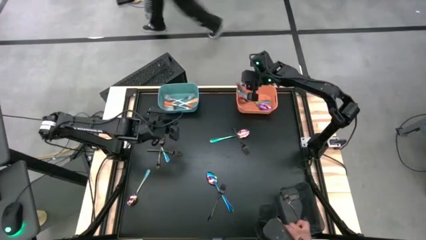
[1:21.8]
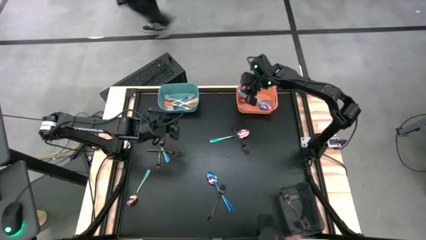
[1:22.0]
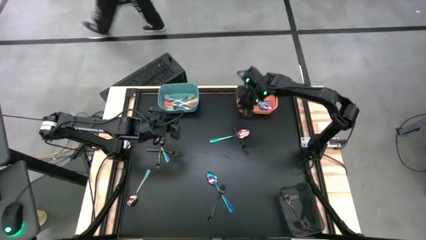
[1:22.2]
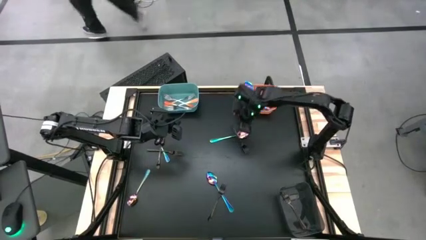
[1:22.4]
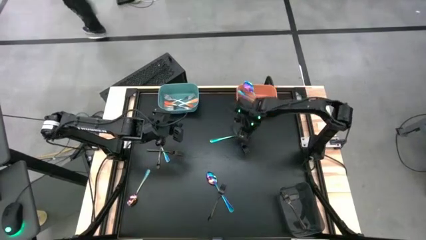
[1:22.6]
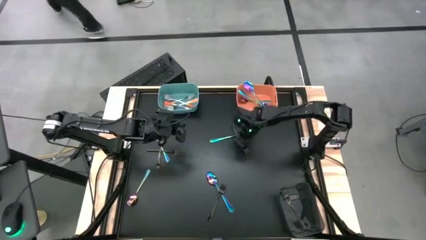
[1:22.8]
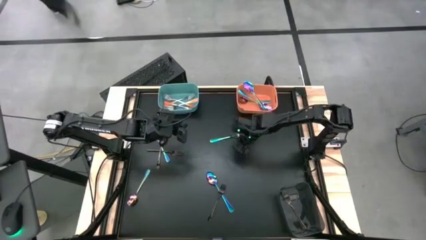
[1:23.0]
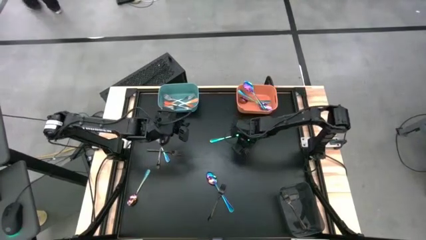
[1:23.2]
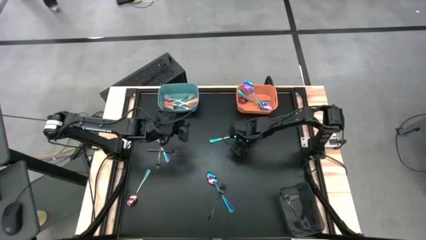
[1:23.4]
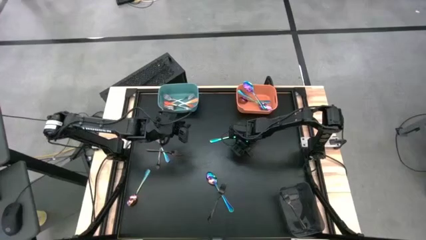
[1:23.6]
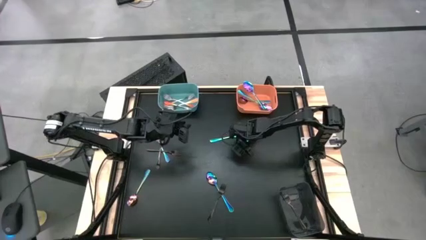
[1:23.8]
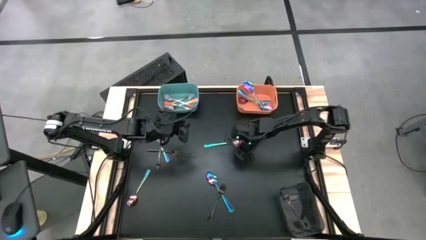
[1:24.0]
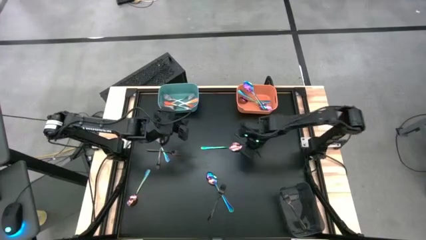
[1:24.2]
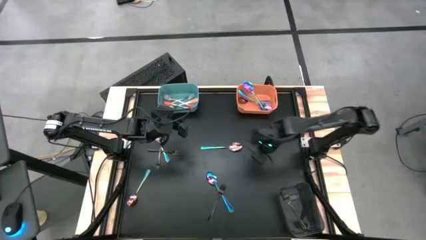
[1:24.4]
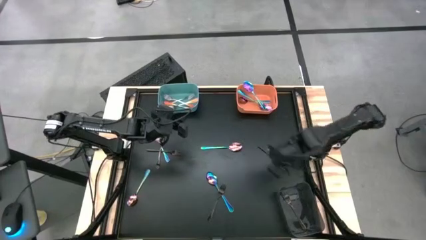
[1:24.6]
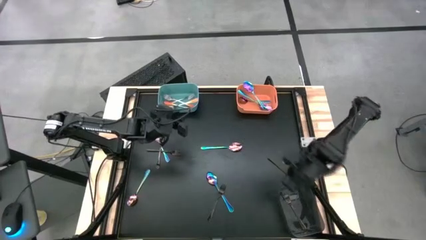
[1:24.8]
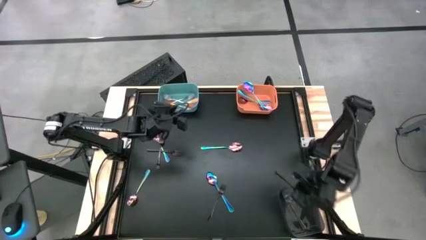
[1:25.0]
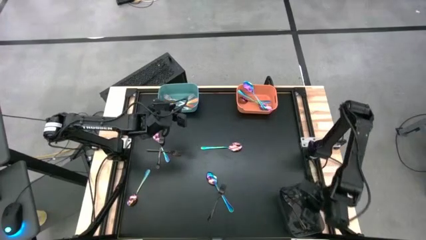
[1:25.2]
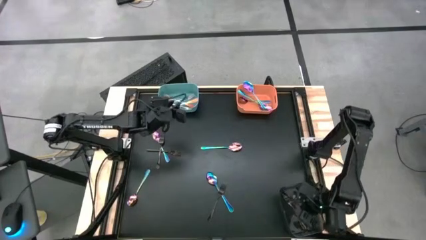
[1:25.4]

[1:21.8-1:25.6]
Task: Sort silverware by color (type)
Put the black fork into the black bin

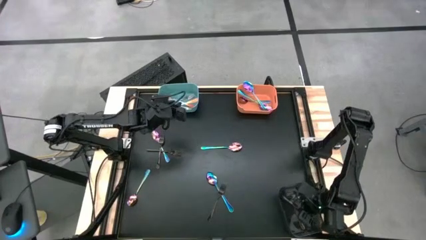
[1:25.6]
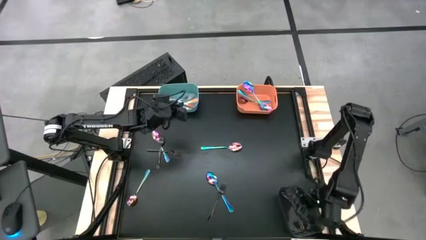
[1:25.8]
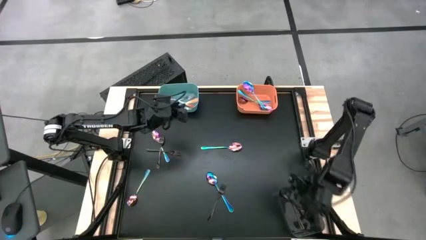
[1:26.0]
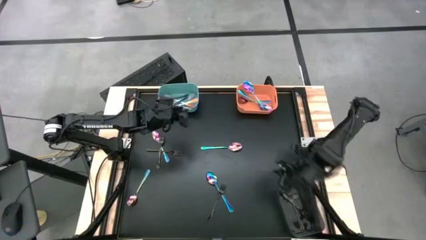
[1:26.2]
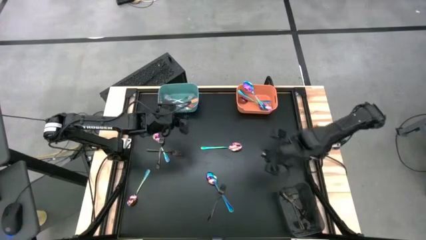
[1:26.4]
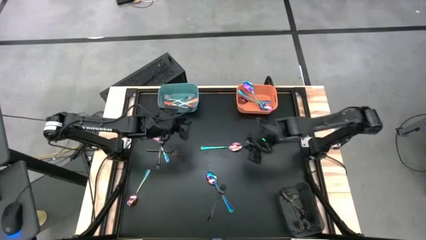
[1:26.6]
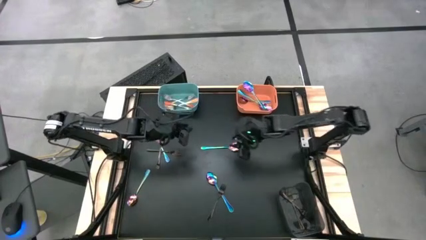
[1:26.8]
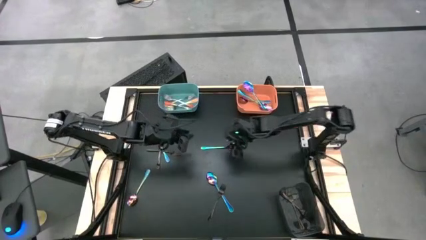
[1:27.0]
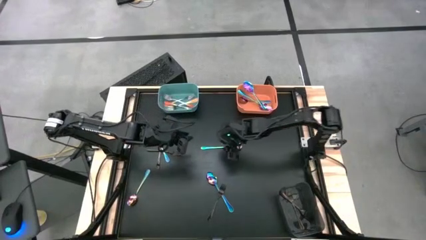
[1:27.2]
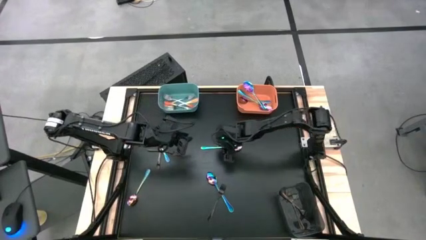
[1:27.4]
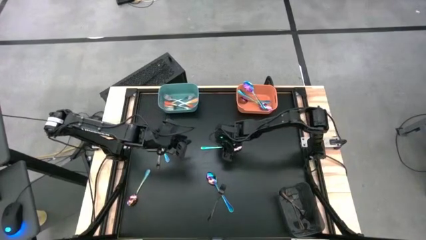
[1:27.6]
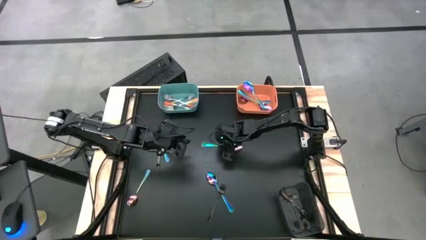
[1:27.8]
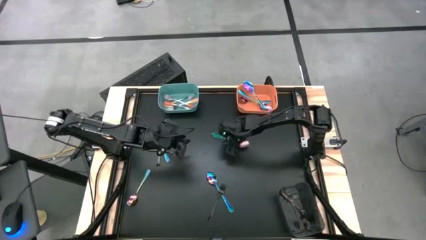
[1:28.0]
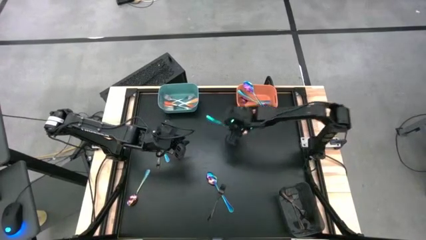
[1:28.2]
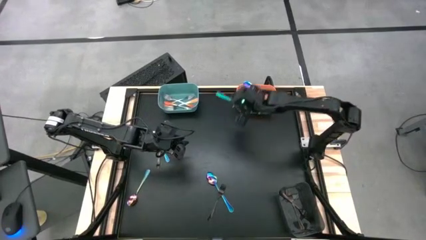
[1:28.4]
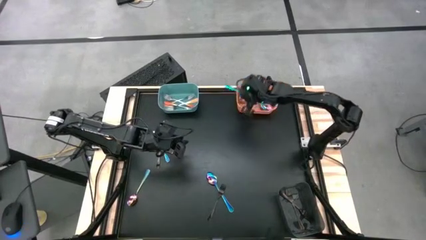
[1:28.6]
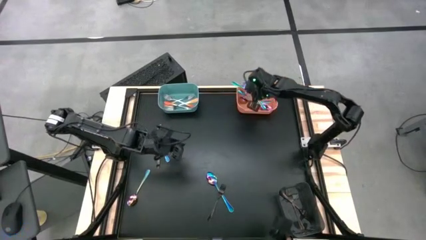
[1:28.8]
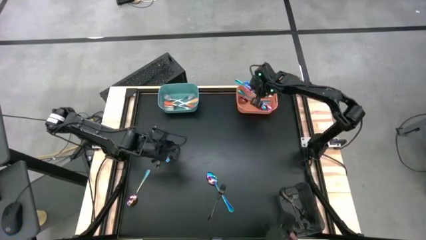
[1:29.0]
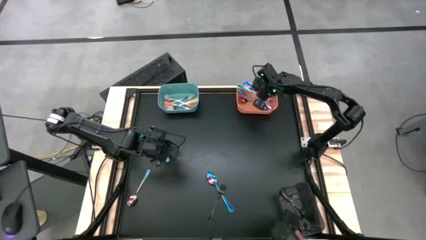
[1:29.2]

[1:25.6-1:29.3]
Put the purple spoon into the orange bin

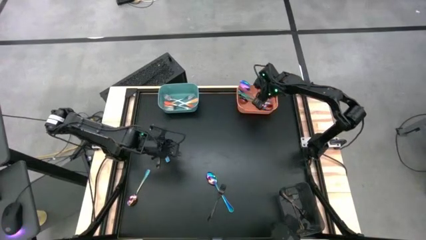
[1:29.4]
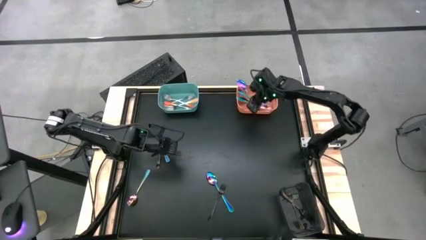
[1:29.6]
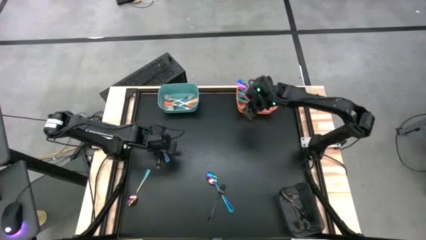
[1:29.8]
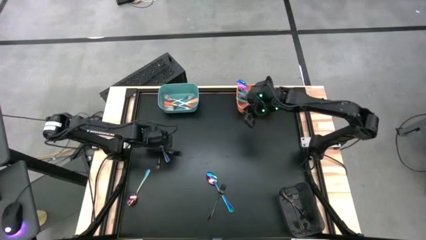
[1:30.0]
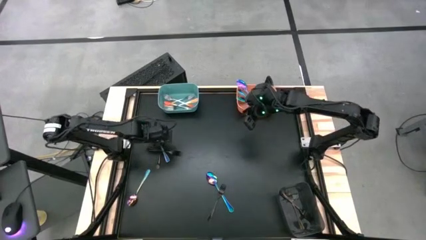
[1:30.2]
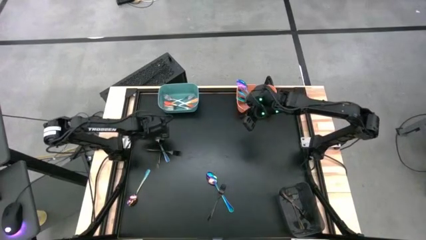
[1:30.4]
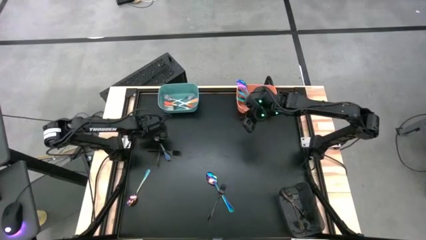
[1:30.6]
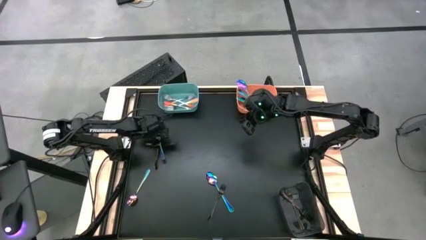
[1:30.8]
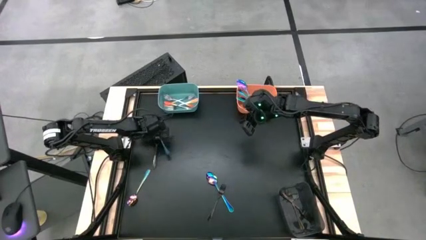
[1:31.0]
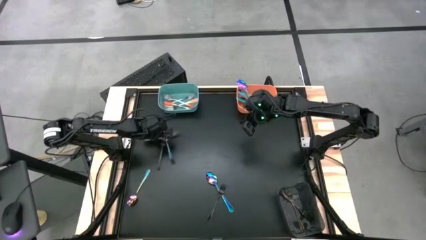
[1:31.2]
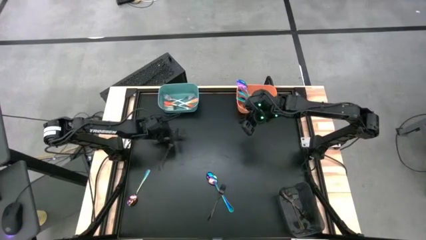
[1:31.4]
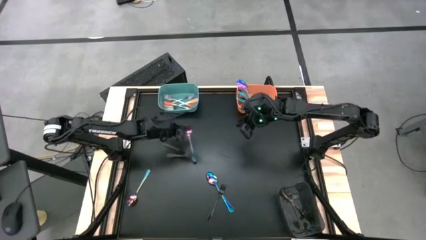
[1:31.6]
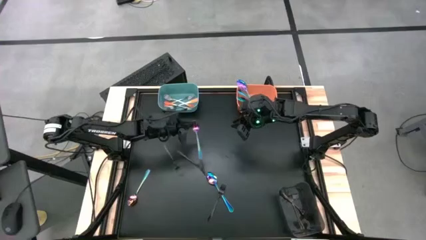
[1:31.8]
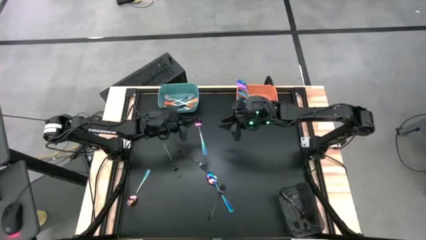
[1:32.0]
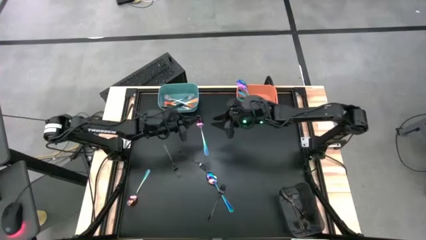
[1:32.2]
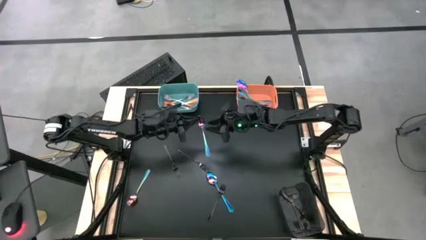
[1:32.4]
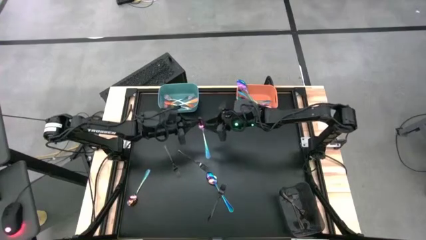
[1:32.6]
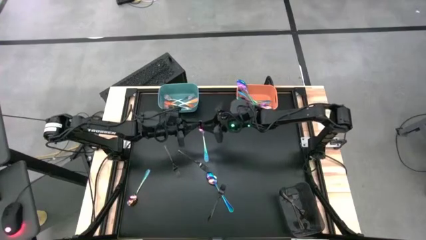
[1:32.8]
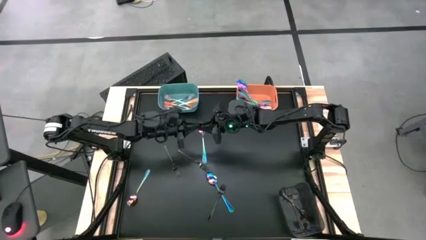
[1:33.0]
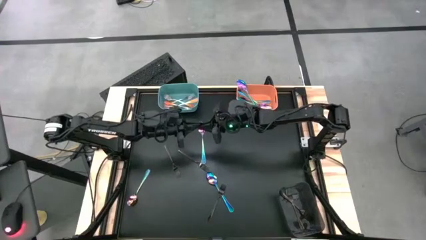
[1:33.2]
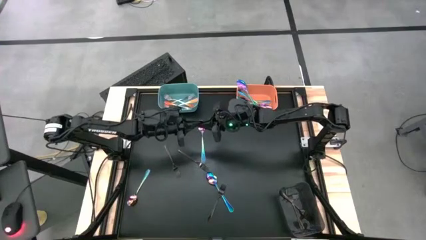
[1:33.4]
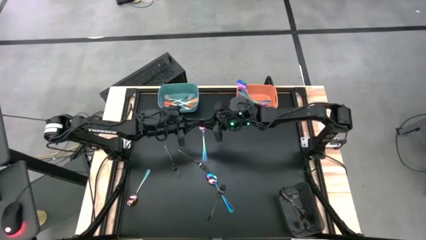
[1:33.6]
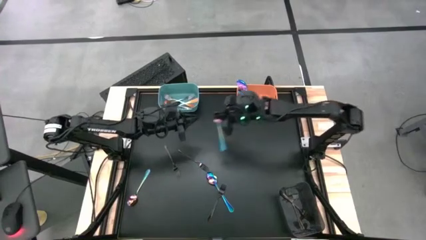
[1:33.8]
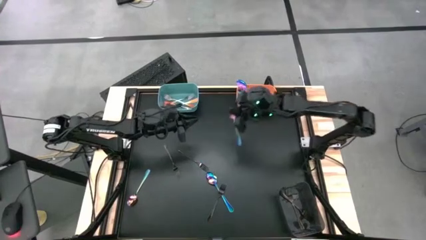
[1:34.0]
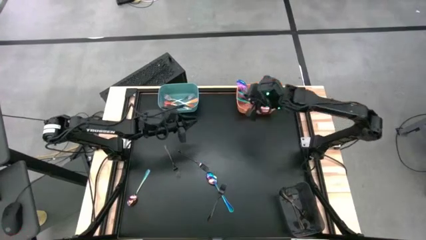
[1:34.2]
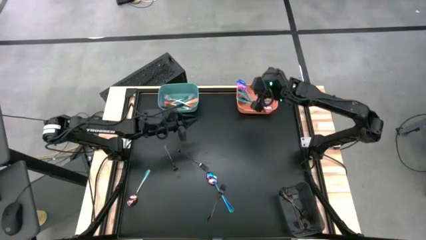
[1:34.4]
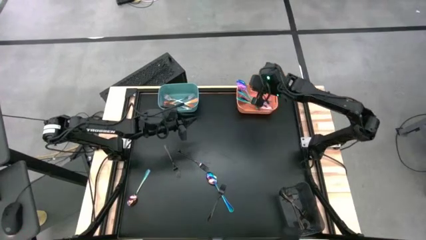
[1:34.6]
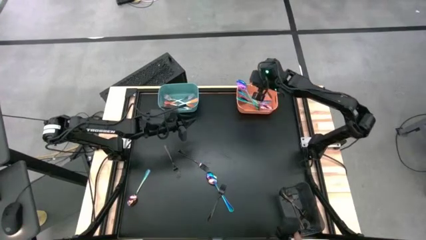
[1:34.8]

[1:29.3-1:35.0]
Put the purple spoon into the orange bin

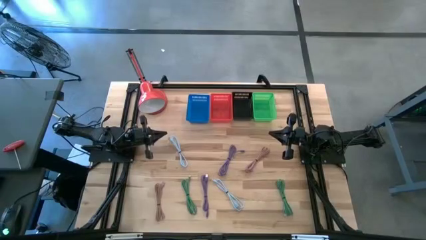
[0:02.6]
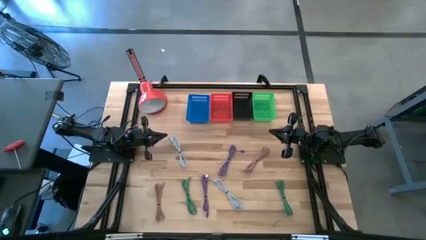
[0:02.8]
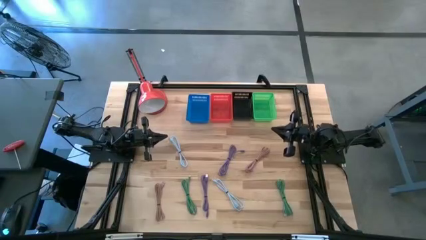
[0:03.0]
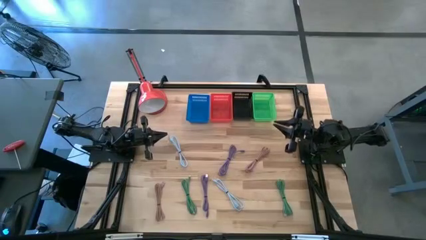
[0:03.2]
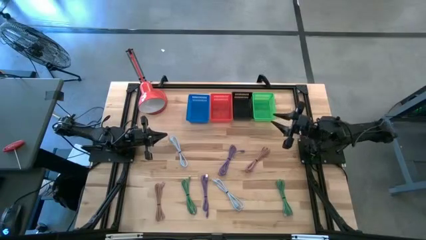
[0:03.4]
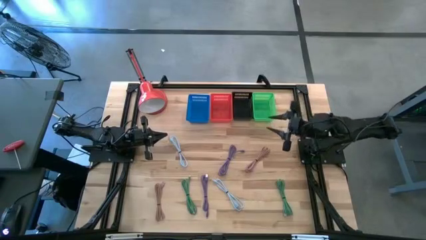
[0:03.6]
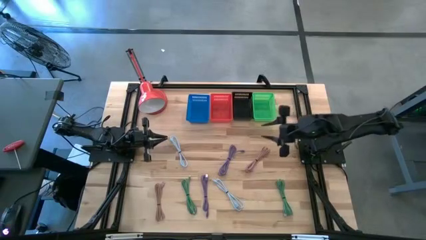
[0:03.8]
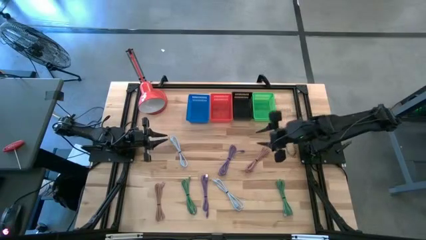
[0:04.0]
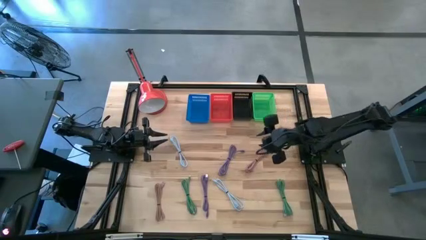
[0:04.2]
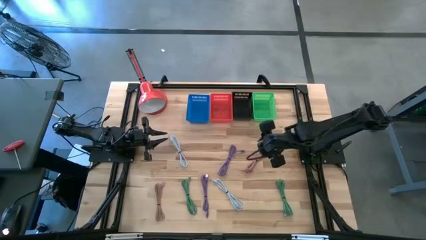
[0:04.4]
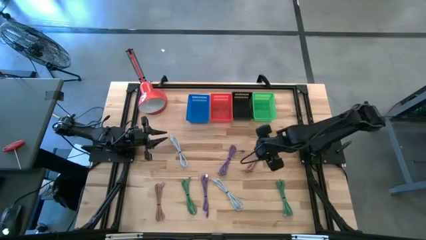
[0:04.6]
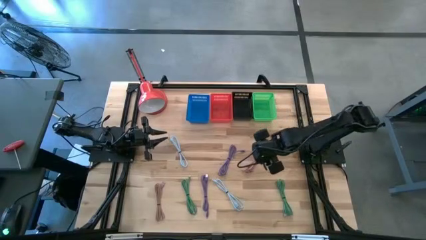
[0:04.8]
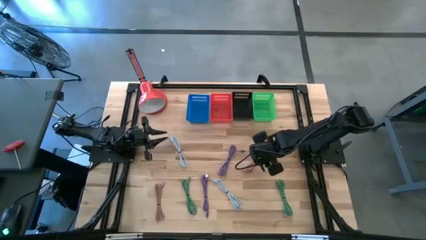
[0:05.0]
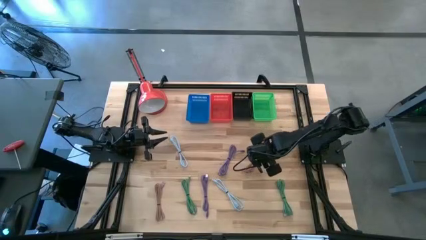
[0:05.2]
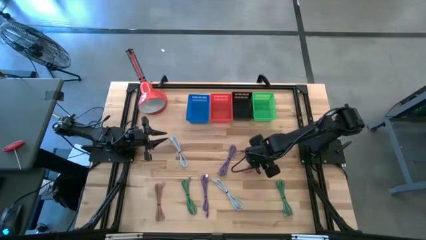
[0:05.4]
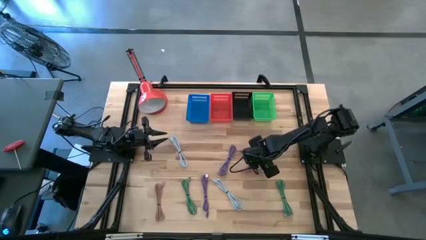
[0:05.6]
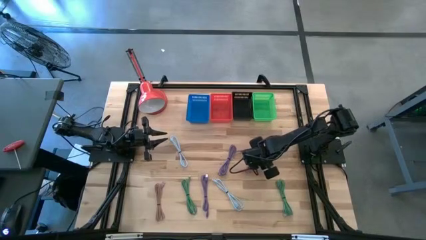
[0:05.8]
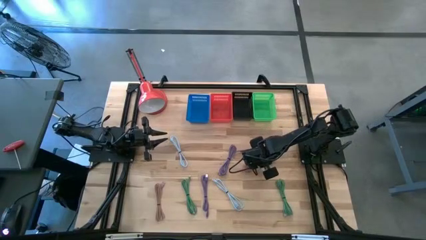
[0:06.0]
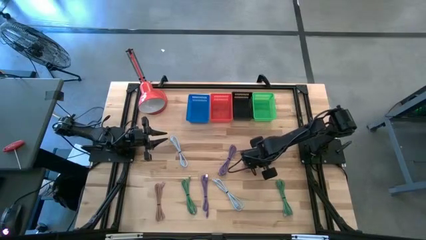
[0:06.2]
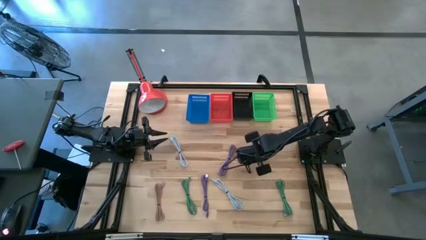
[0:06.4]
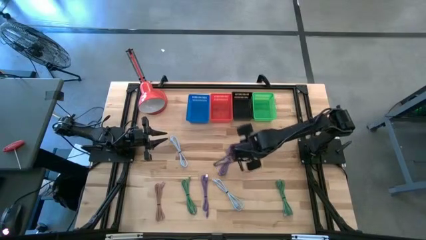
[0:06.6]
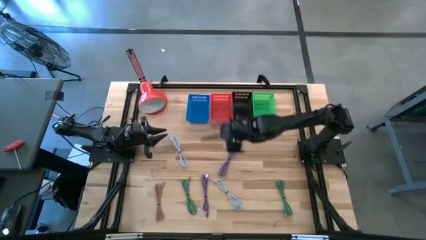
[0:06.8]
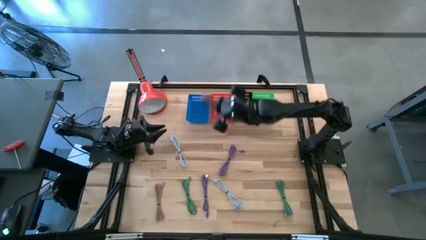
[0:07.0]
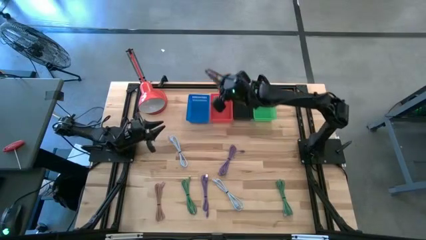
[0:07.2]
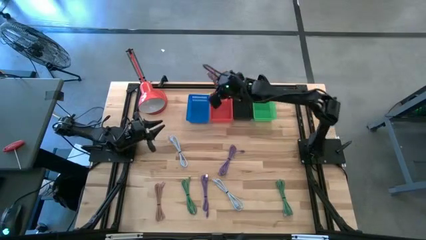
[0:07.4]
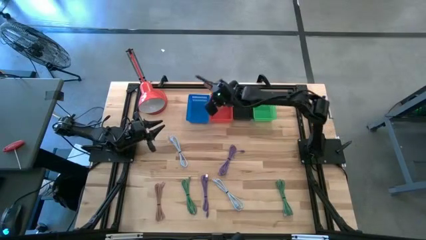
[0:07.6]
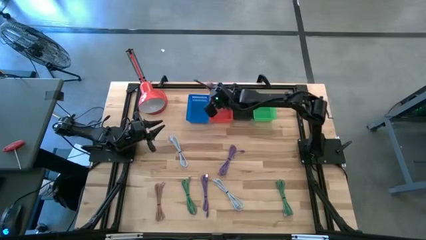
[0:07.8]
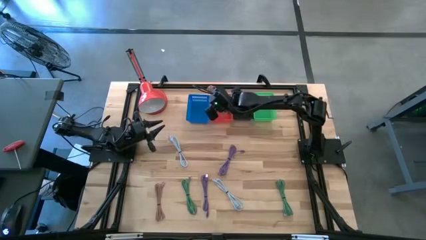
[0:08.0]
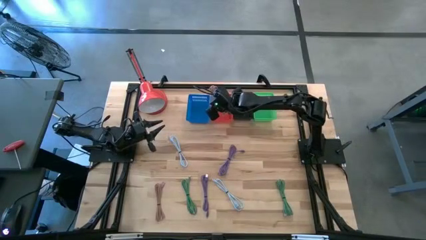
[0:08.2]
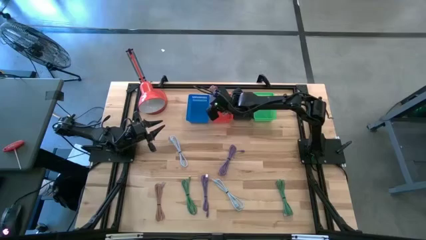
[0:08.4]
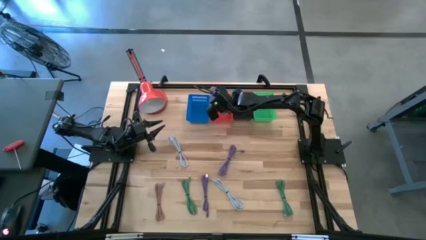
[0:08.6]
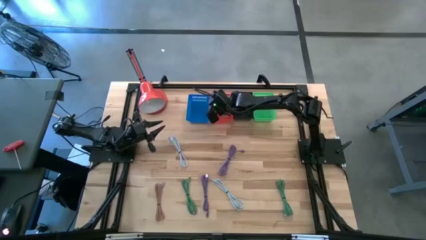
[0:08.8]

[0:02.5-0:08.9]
Task: Pick & Place USB Port
Put the right pink charger cable into the orange bin
